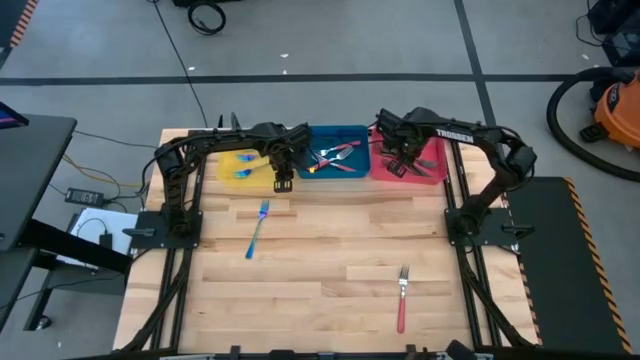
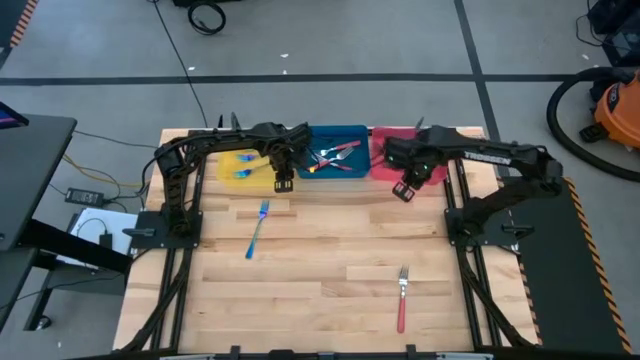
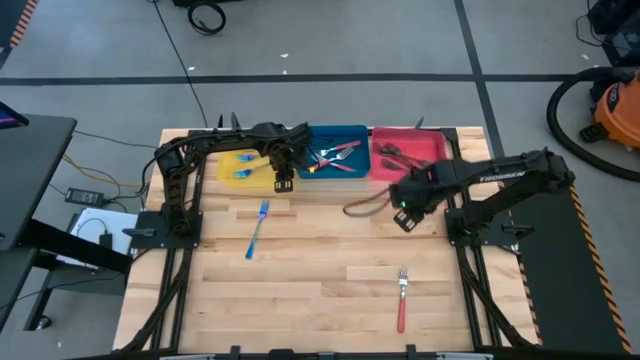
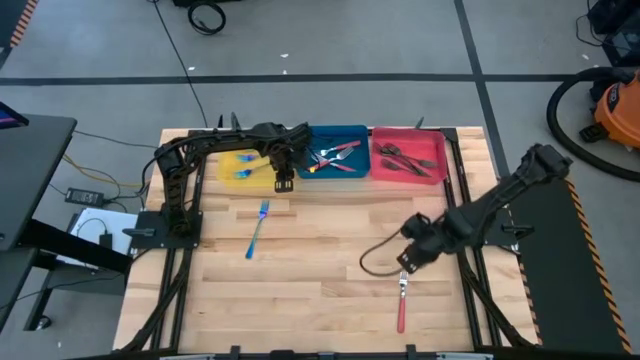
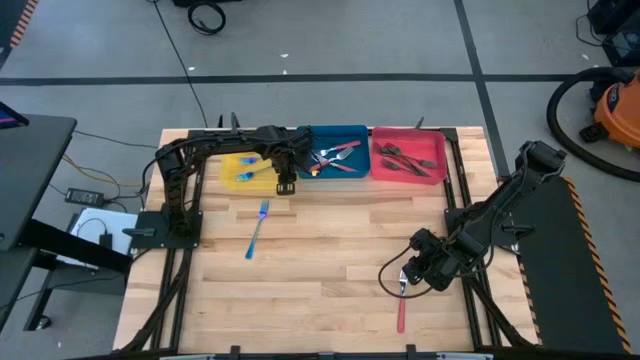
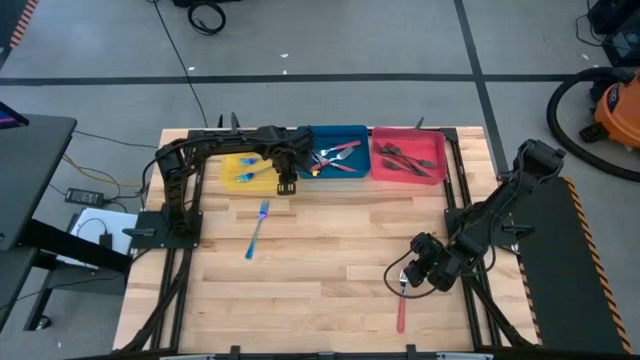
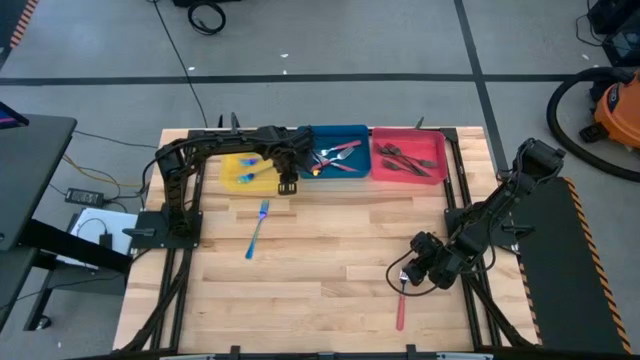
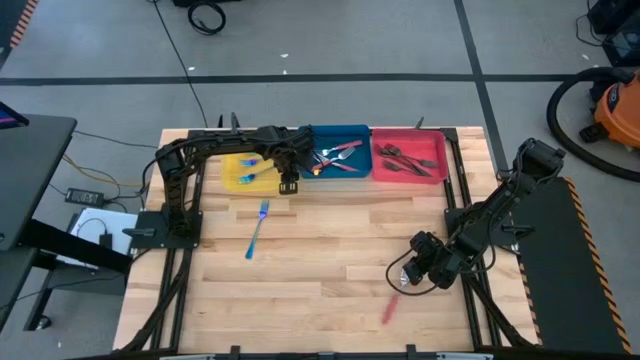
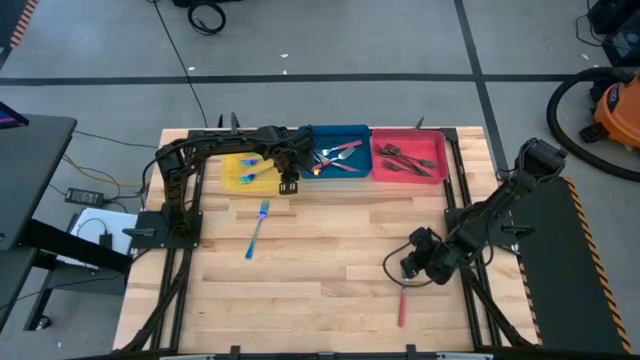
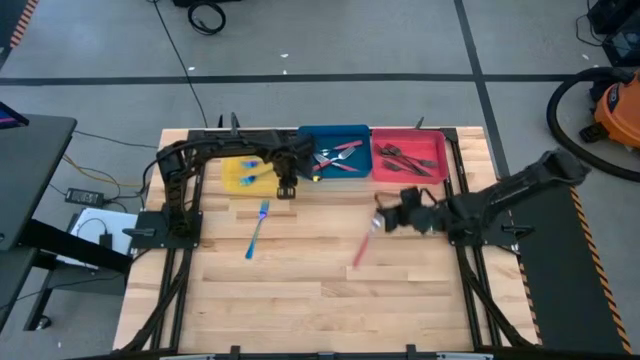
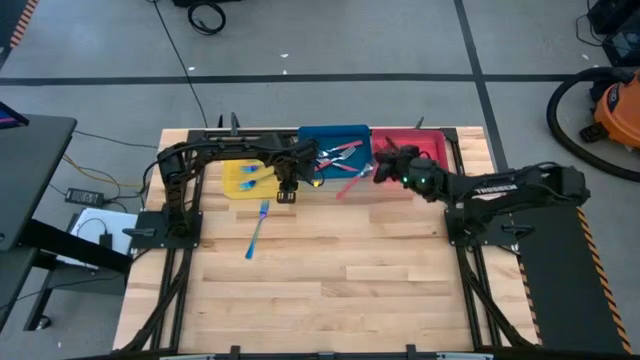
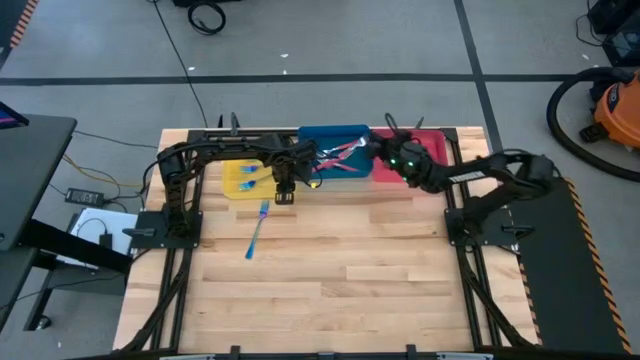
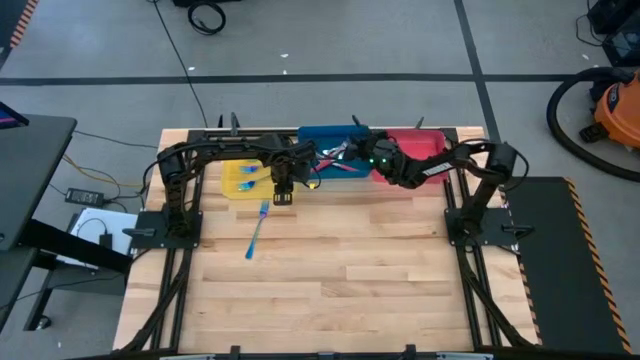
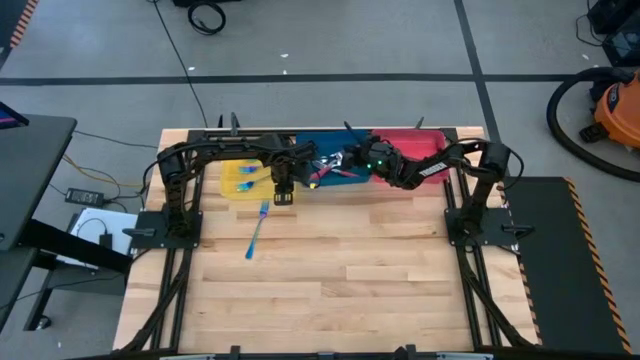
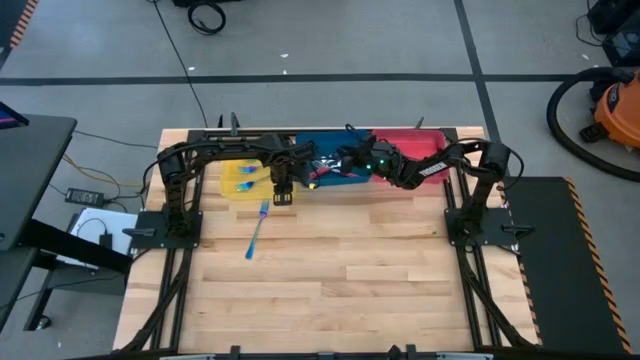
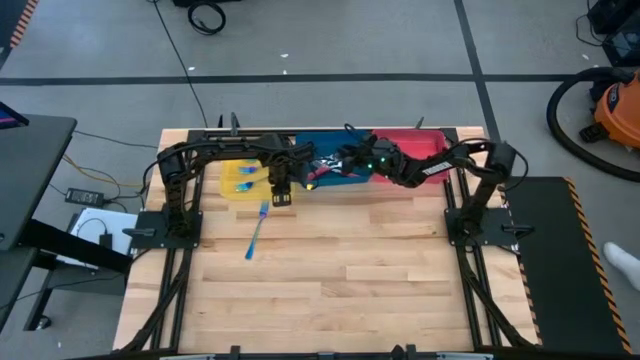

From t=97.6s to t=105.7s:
Task: Sort silverware by color (type)
Put the pink fork into the blue bin

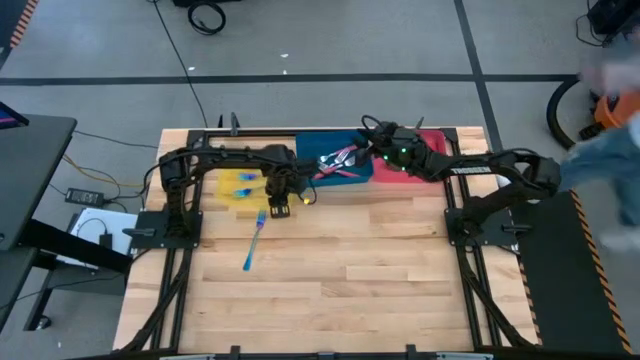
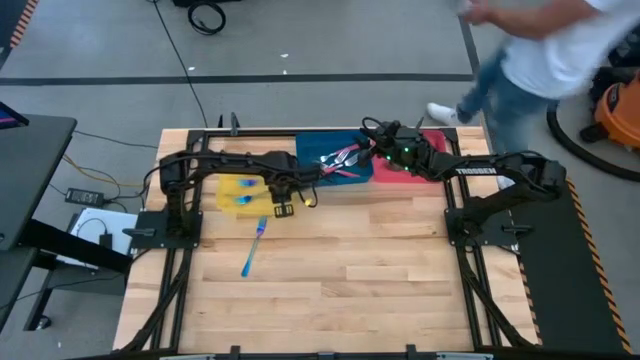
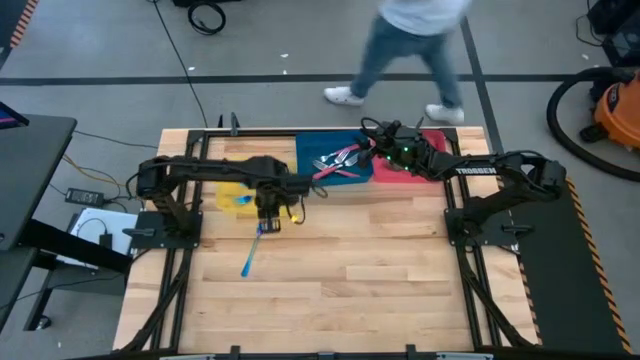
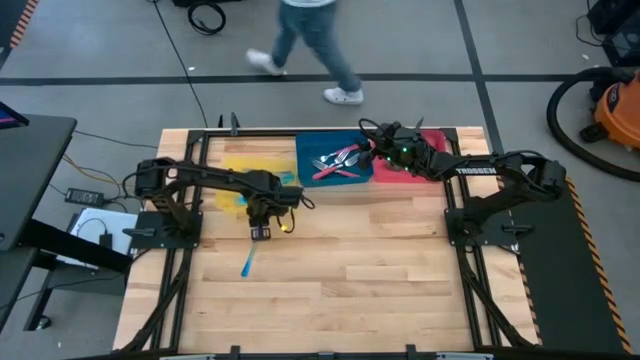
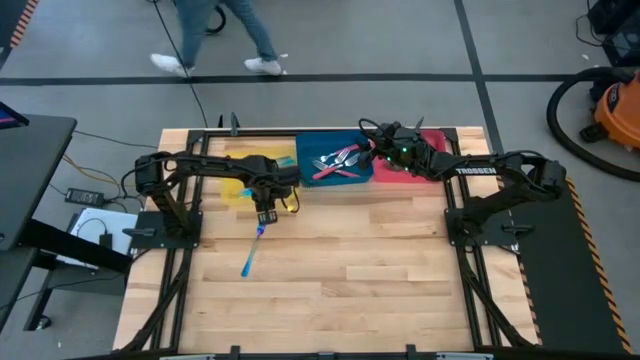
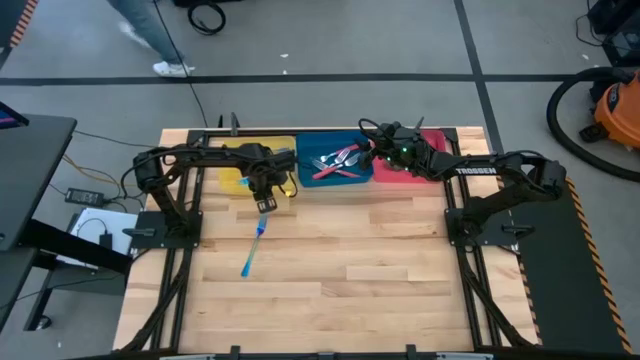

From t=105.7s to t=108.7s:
Adjust the yellow bin

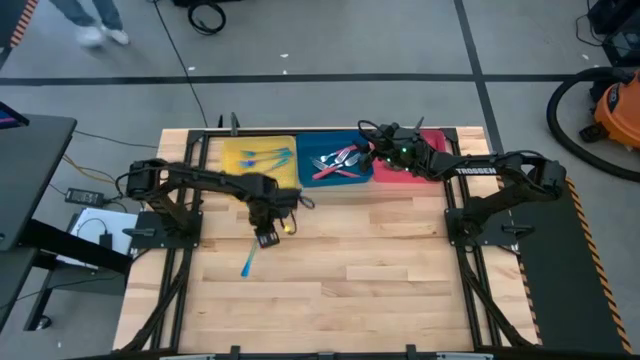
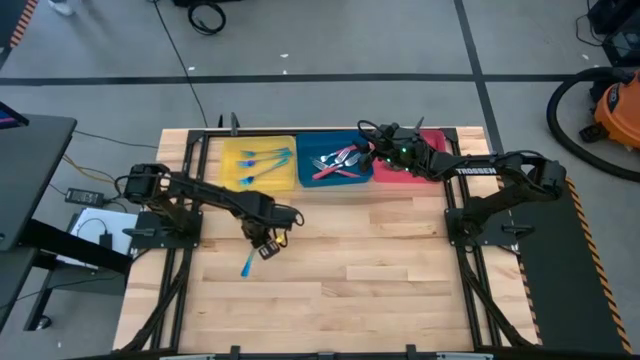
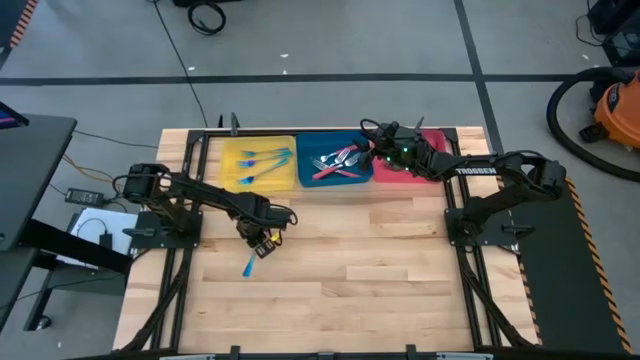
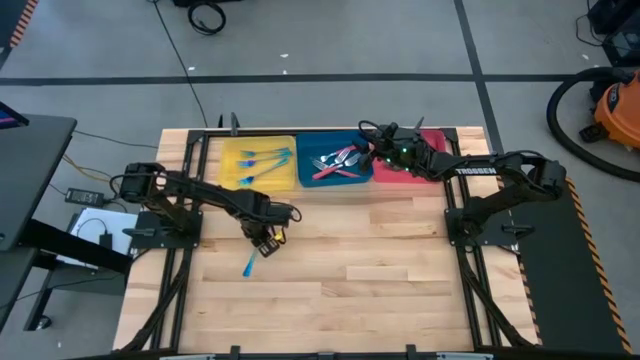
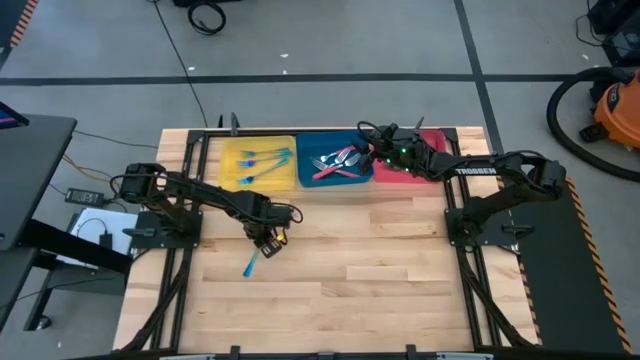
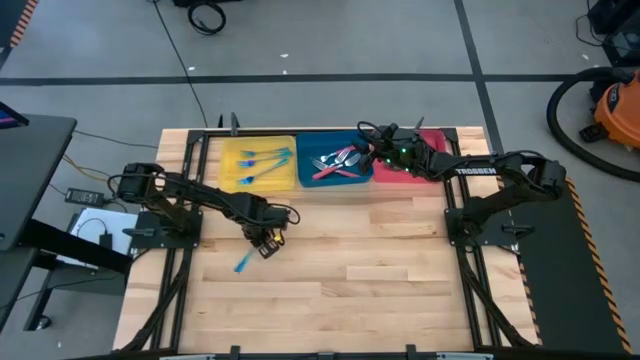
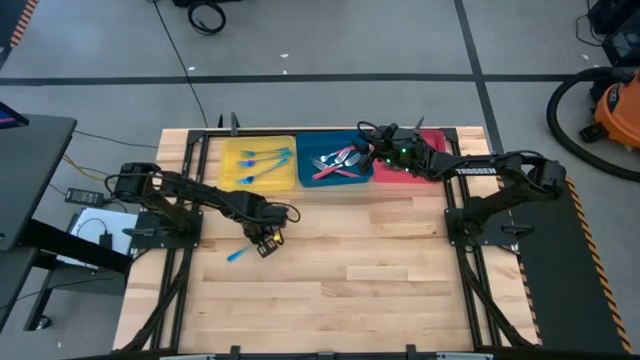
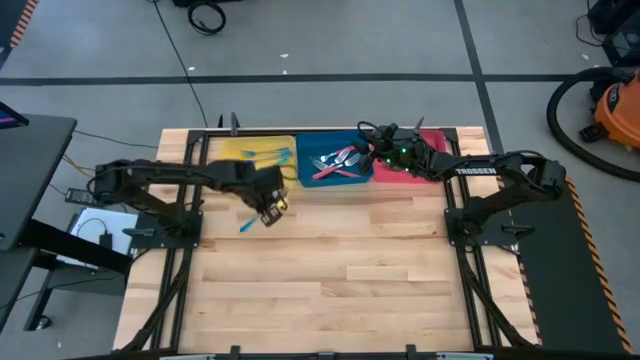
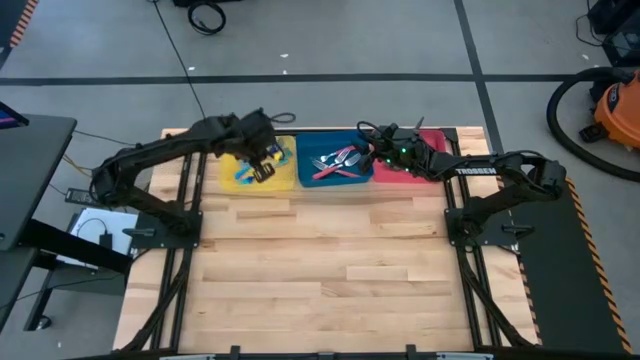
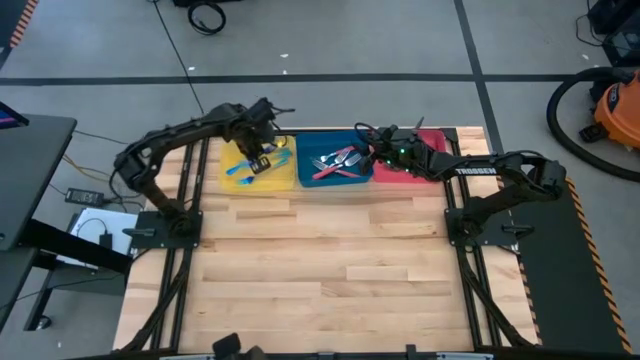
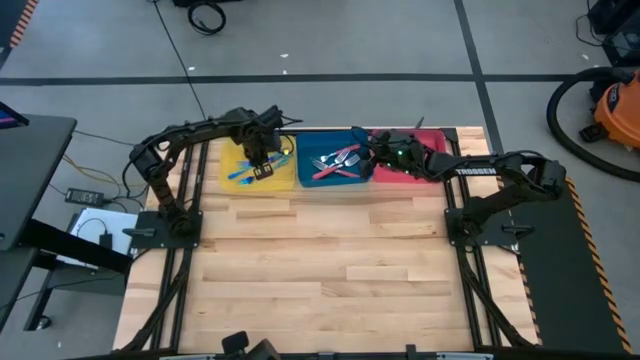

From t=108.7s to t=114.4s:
Put the blue fork into the yellow bin

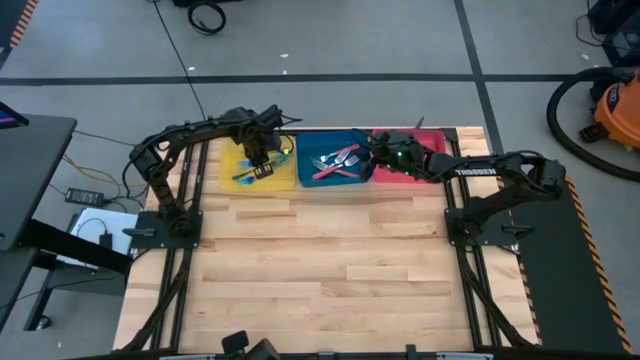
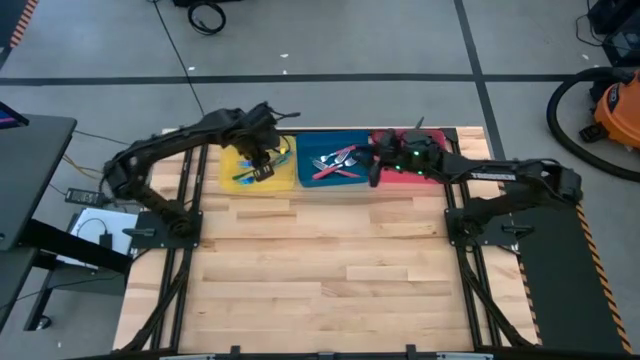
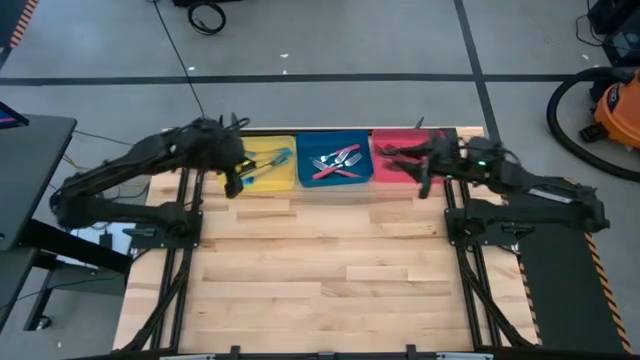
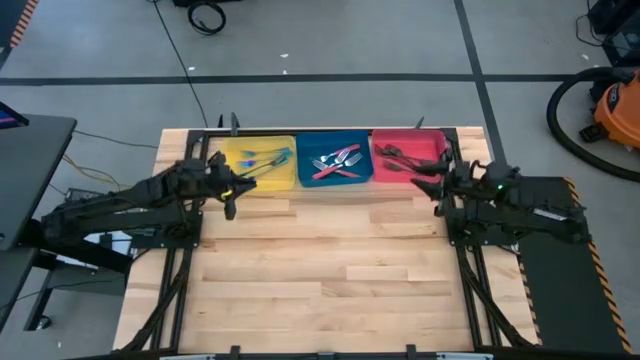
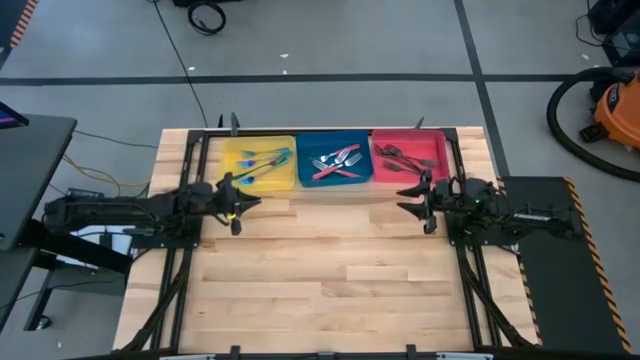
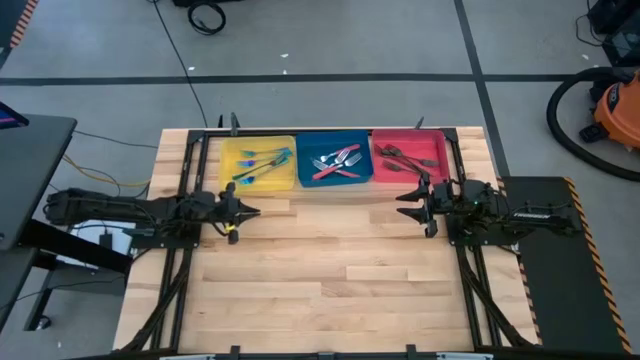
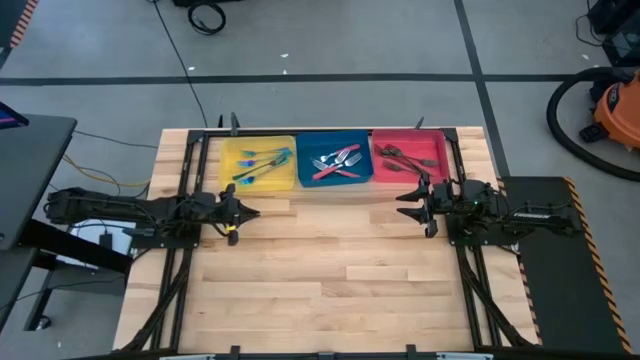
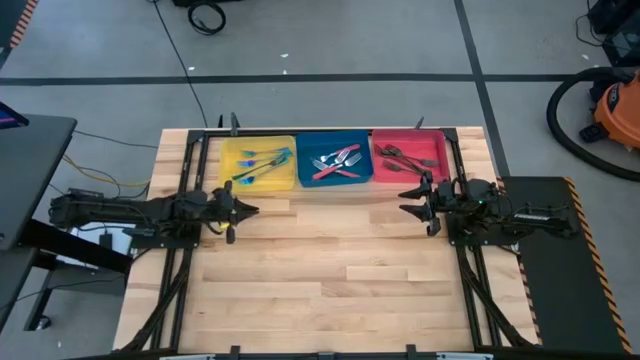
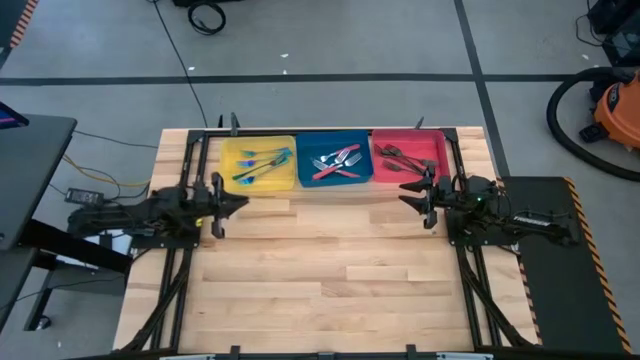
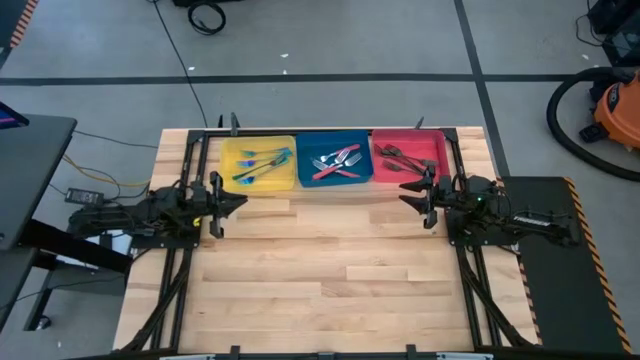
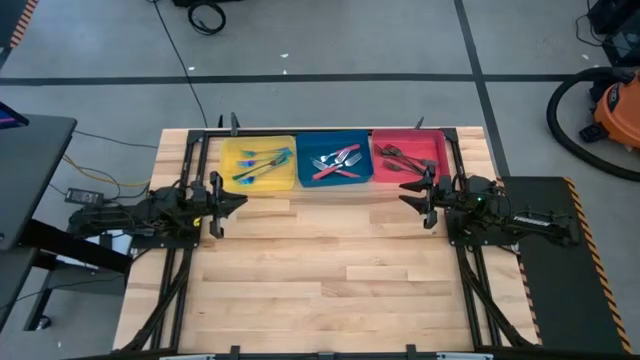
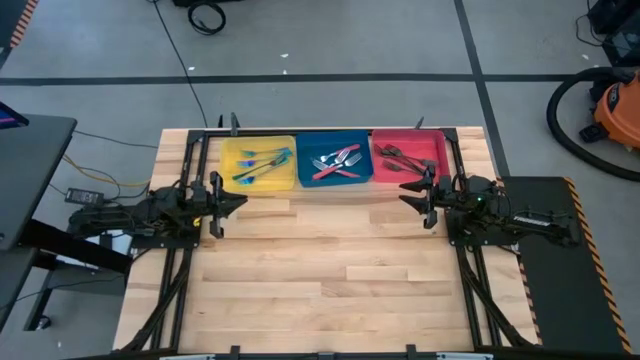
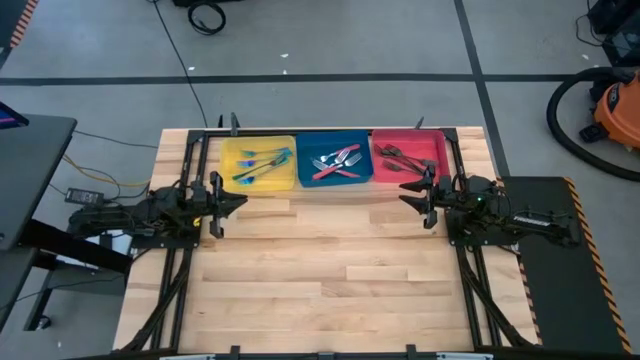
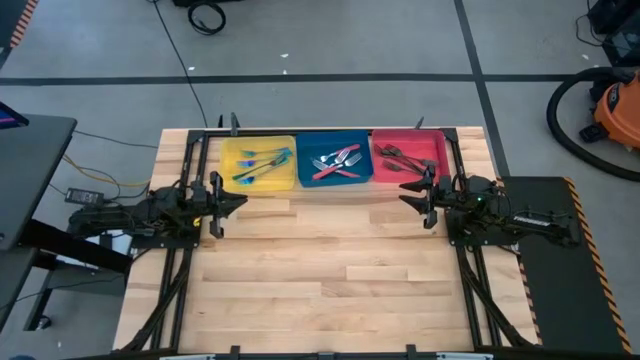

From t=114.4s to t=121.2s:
Return to Home Position
